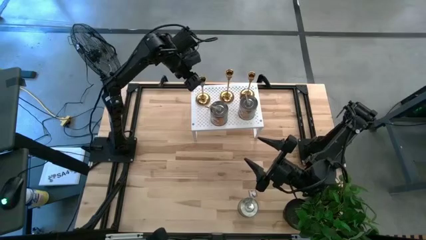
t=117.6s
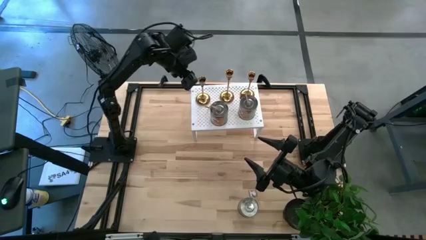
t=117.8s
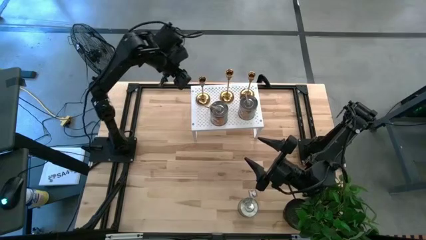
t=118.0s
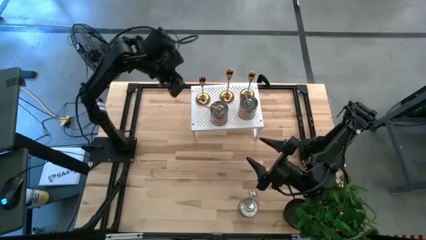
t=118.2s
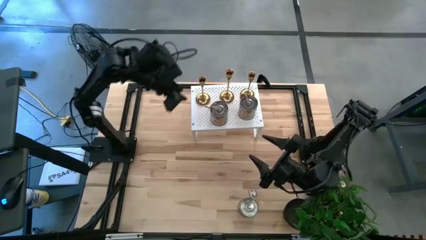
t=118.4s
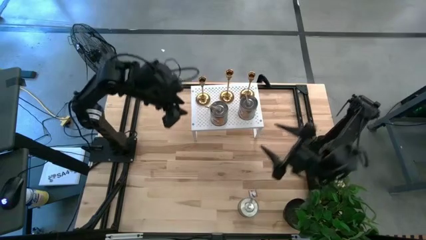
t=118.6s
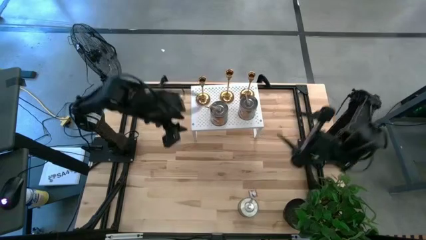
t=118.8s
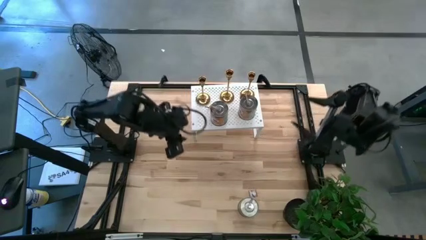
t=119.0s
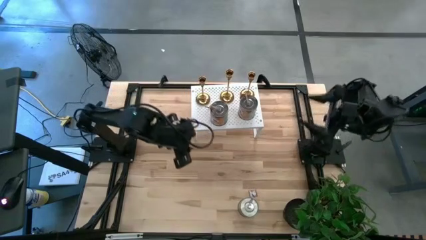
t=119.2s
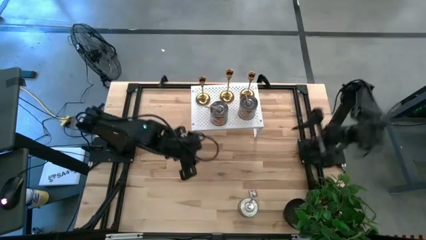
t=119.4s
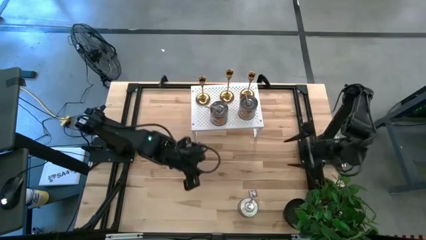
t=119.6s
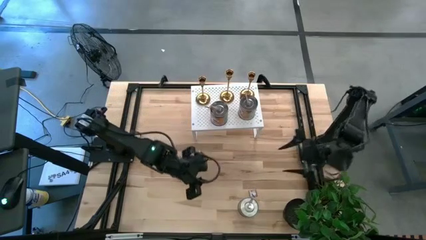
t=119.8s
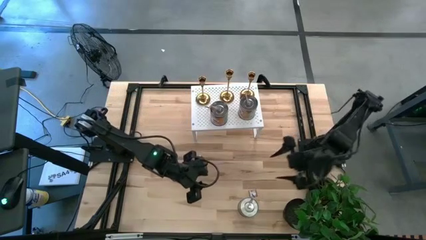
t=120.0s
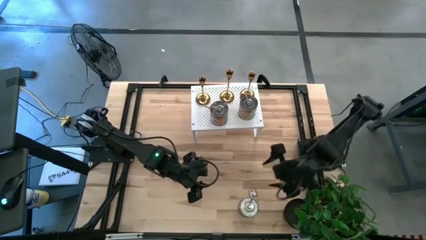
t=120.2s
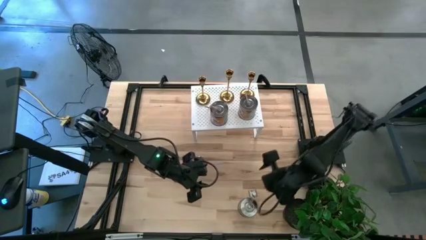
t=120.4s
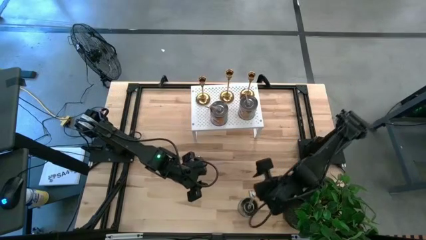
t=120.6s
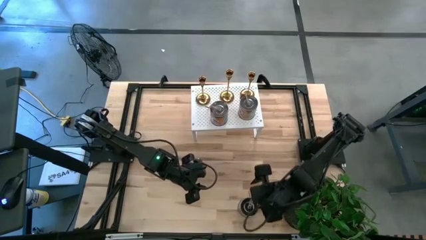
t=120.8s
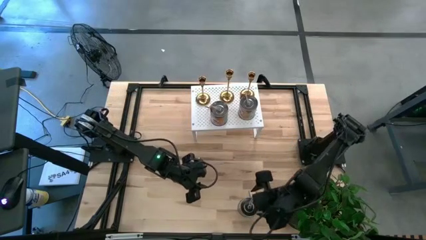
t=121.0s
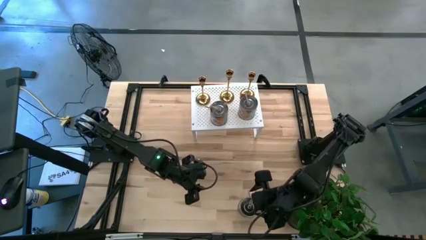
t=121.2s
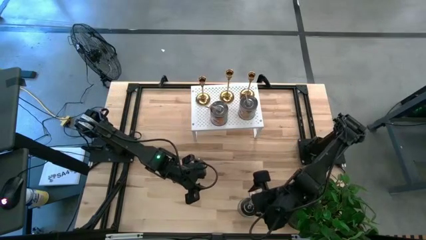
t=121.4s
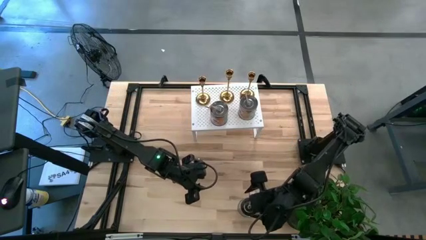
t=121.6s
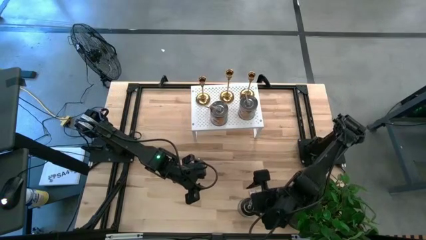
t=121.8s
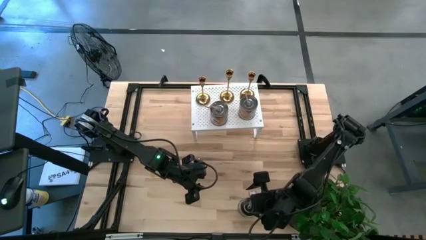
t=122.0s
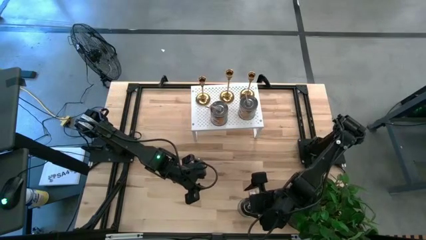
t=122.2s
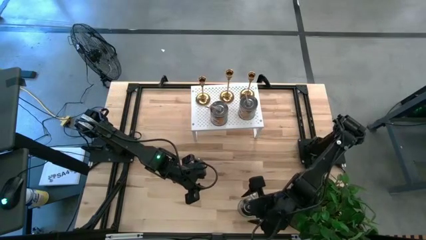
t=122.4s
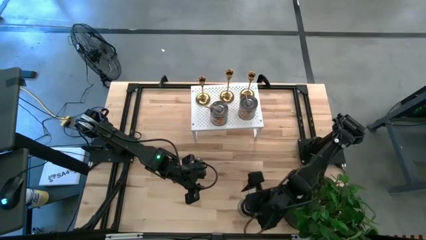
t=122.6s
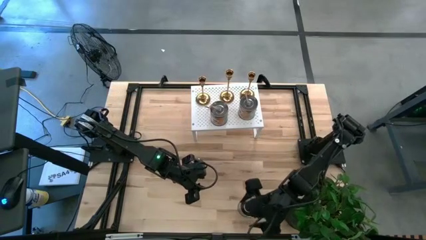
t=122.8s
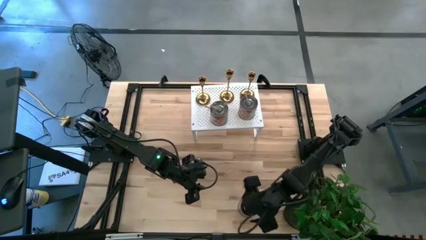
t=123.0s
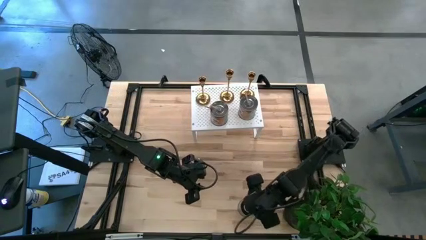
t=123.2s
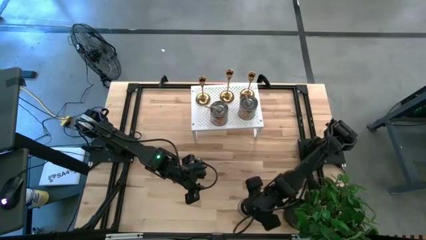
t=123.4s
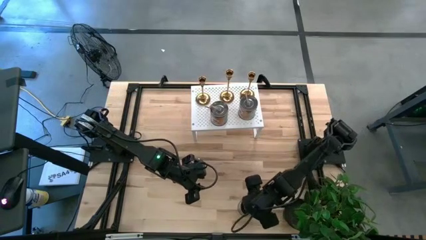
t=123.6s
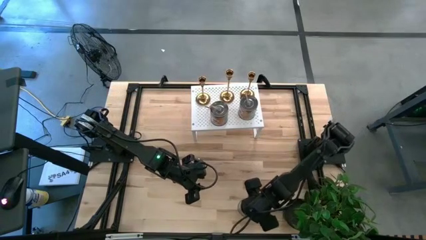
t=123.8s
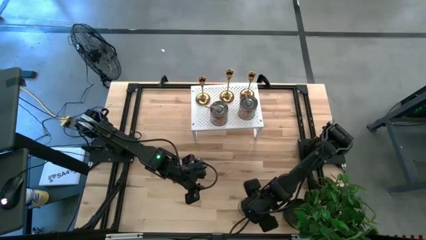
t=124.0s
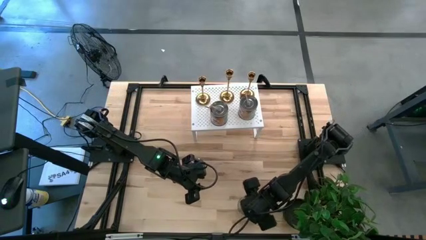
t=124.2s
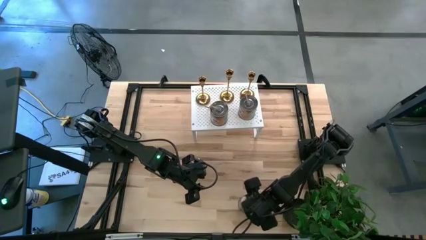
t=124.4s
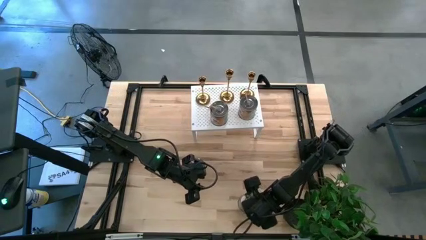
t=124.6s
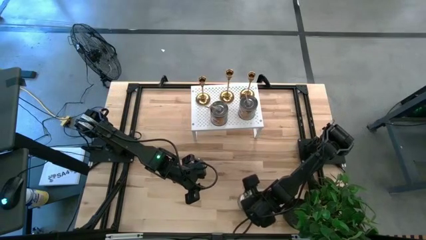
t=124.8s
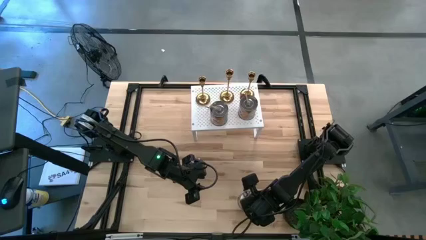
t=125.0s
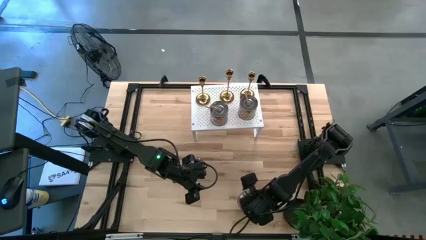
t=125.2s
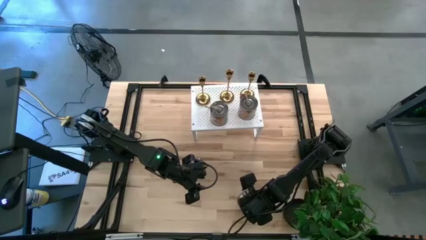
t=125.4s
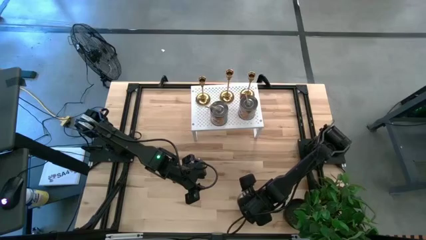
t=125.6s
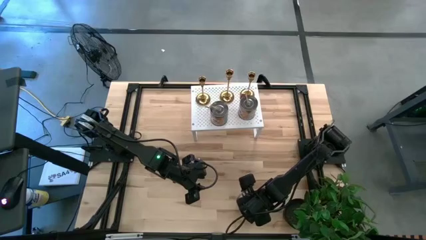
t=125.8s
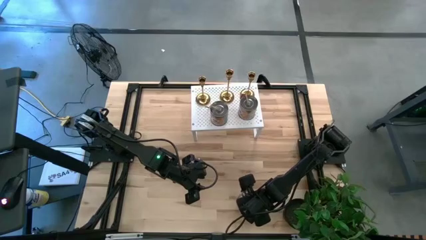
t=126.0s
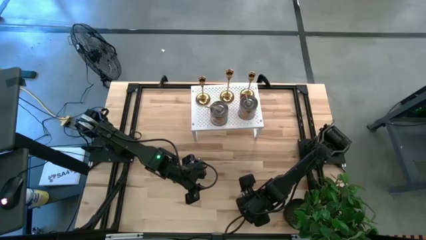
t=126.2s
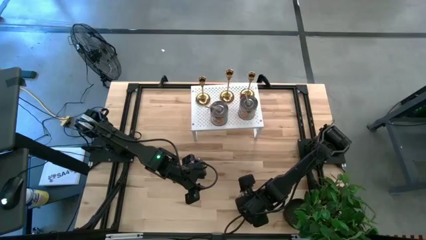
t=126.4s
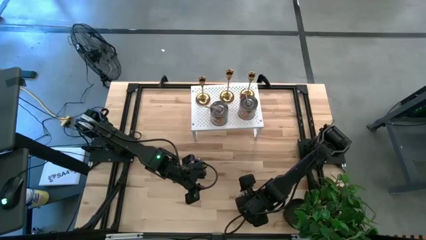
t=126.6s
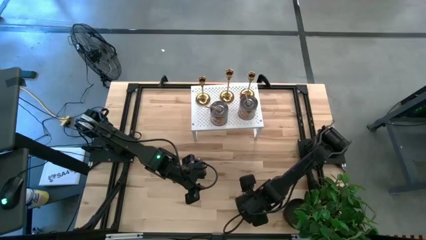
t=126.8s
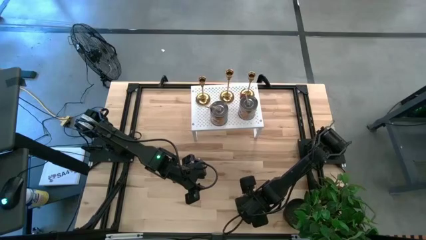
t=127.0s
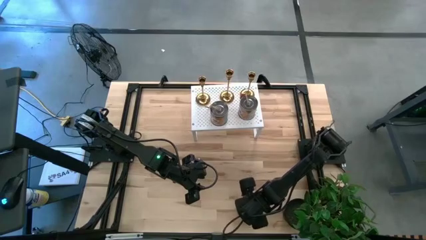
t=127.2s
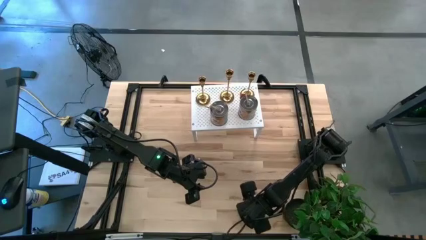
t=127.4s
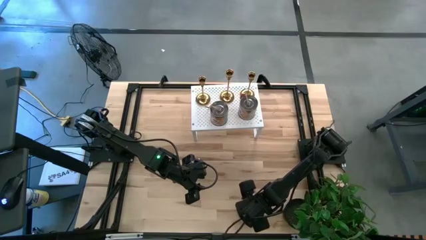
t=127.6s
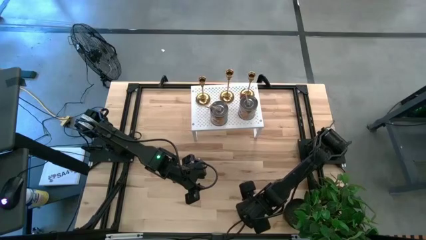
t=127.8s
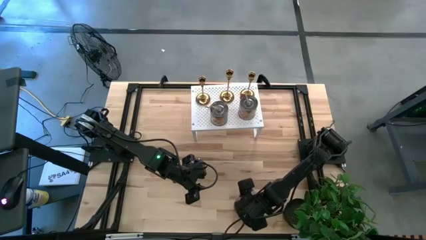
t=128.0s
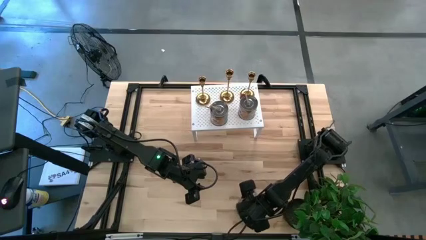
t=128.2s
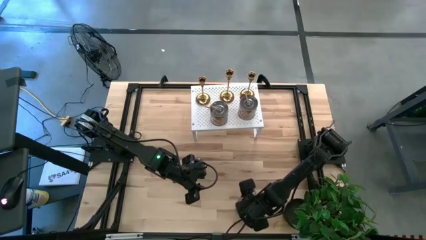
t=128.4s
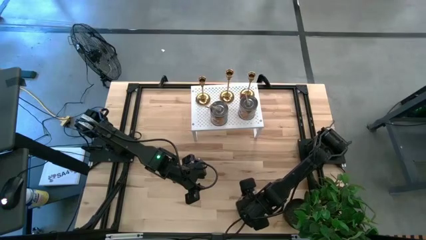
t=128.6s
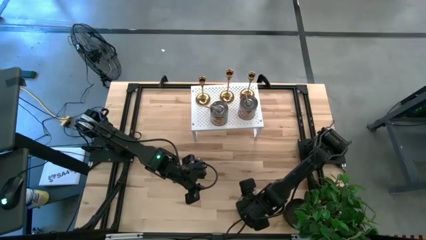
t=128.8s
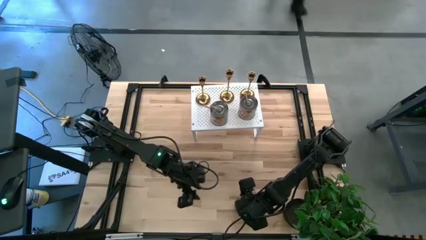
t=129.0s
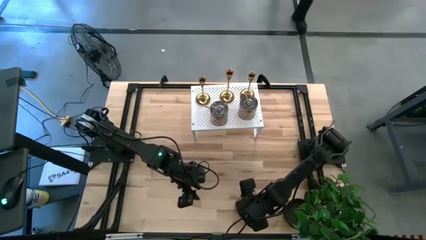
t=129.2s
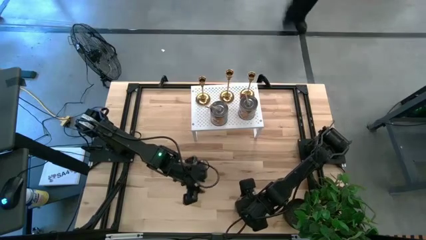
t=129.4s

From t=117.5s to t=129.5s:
Task: Pick & Place candle stick holders
Put the silver candle on the shelf aligned with the gold candle holder

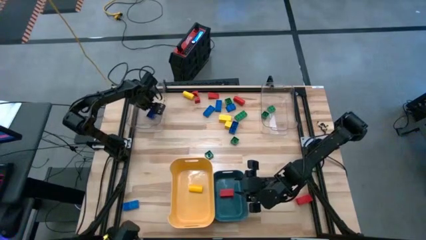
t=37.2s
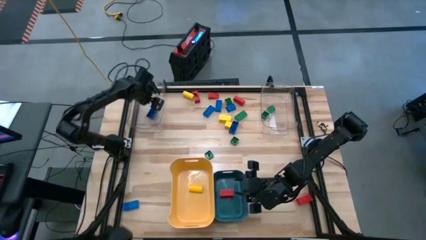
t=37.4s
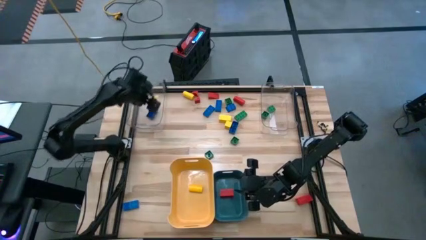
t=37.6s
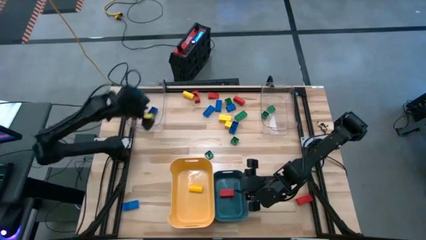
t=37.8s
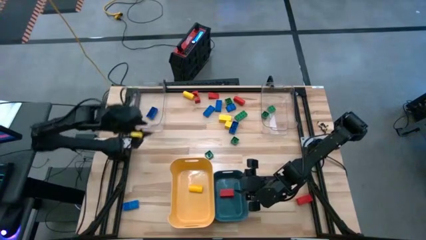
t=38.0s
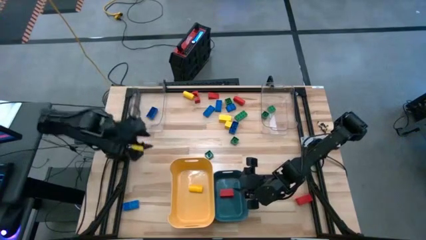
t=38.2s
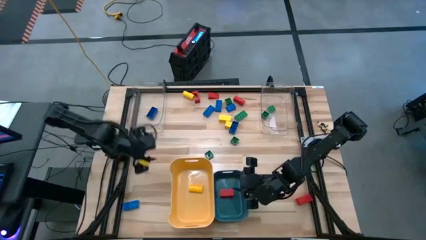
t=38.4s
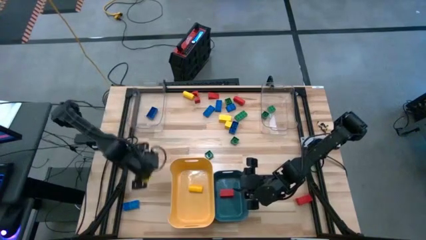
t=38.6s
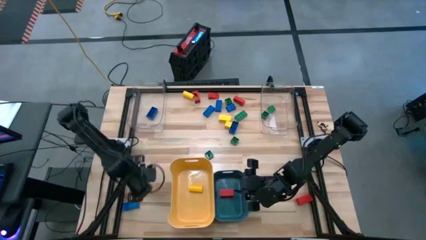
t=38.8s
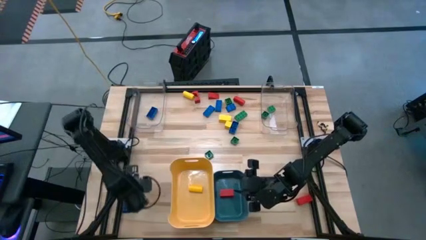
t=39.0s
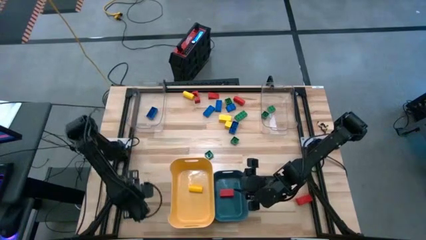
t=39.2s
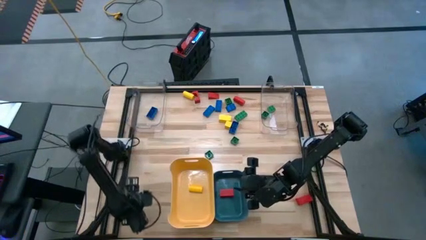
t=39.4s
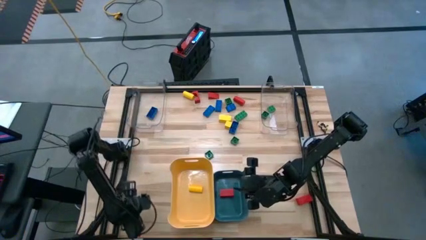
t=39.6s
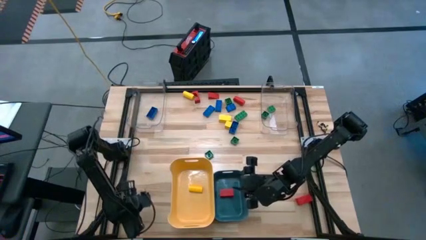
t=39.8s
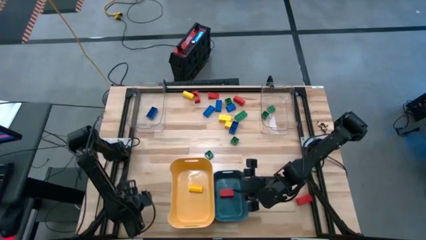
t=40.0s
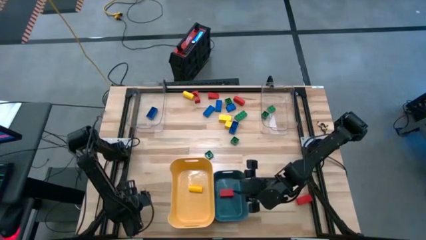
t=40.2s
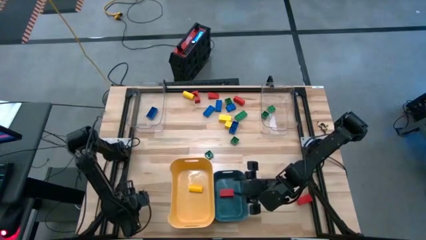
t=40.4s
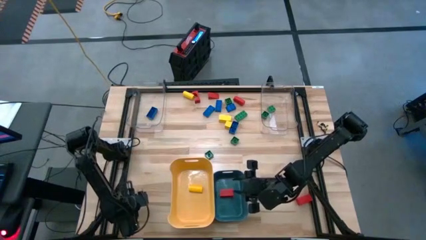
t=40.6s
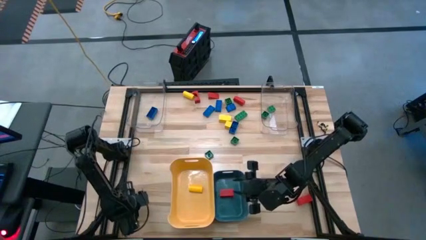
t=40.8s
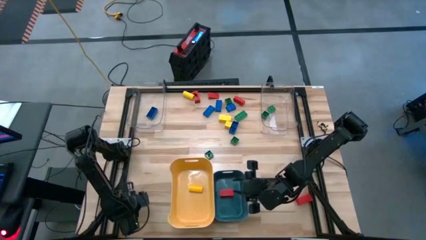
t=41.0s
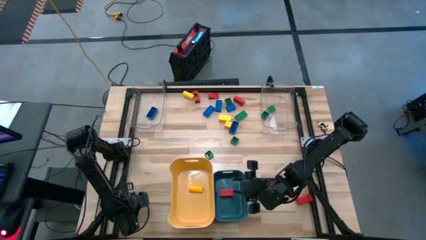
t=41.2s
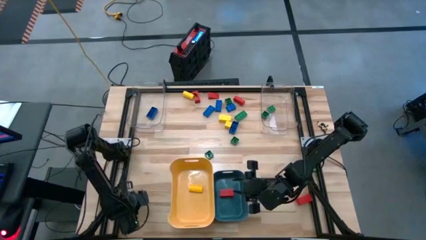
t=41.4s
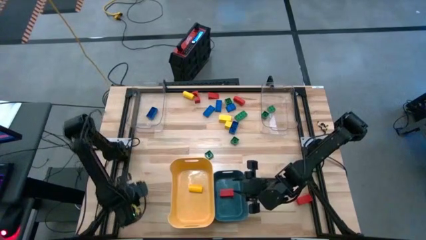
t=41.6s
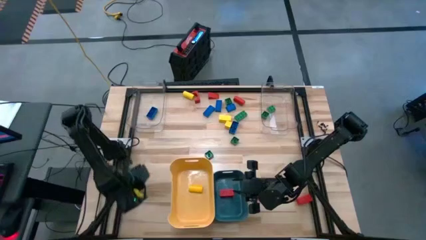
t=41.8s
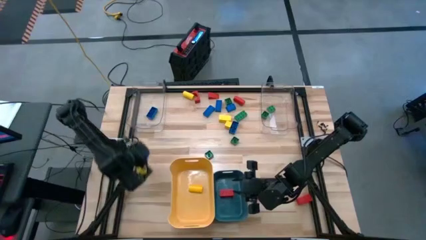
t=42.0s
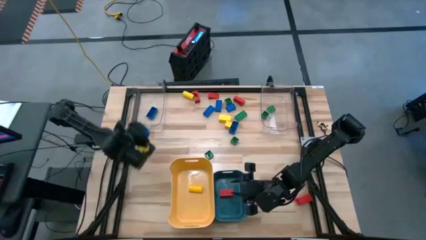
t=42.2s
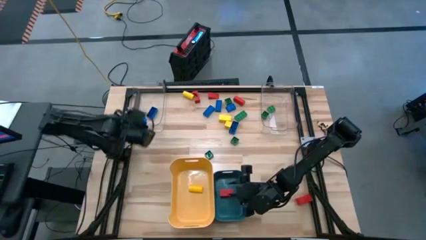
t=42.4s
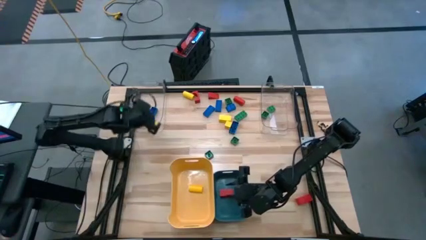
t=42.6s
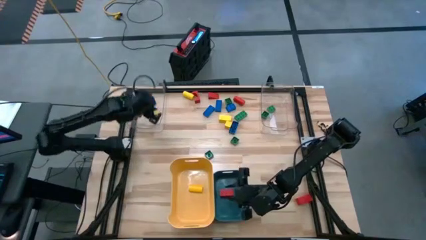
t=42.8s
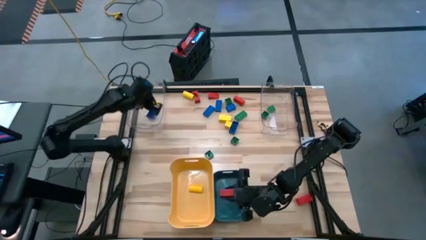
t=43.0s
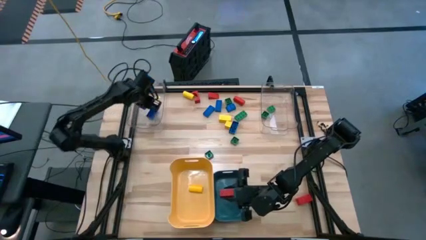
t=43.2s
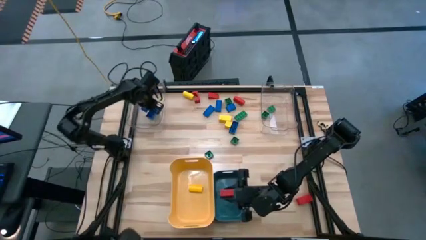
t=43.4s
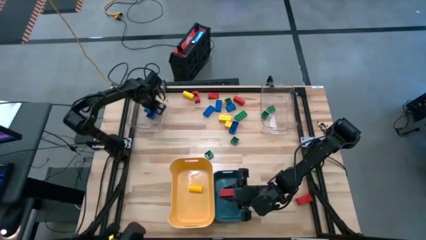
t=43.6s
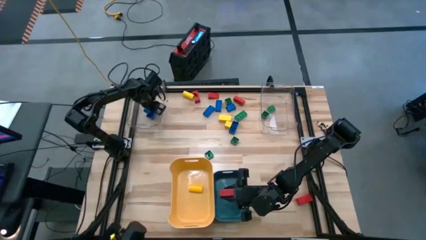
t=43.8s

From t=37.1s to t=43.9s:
Task: Sort blocks
Put the blue game piece into the left transparent bin
